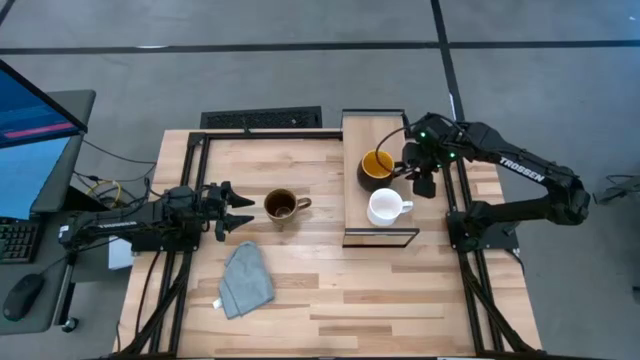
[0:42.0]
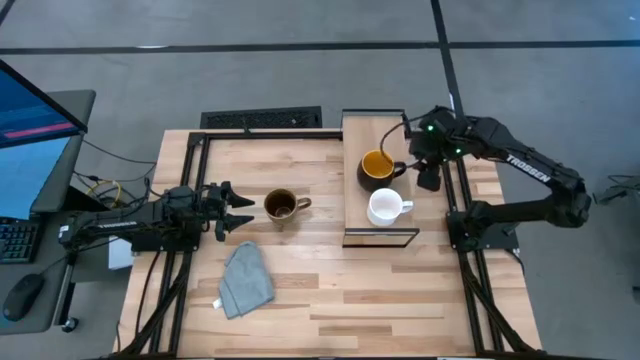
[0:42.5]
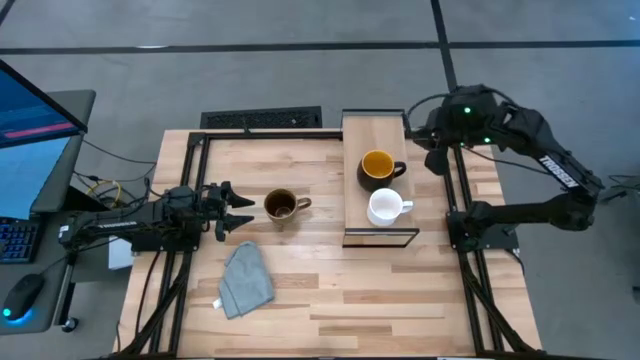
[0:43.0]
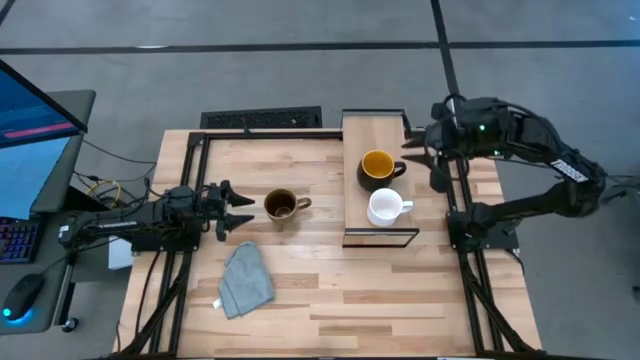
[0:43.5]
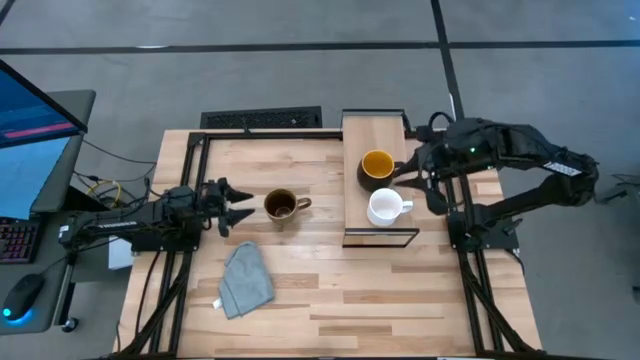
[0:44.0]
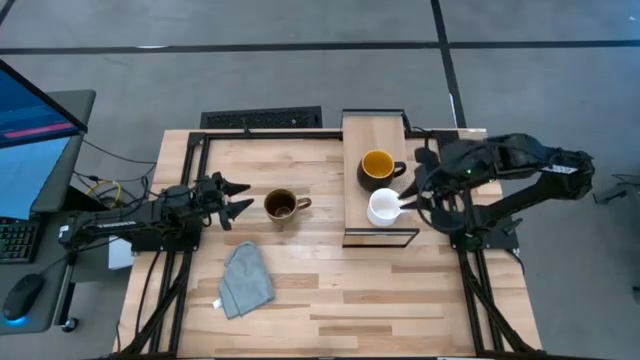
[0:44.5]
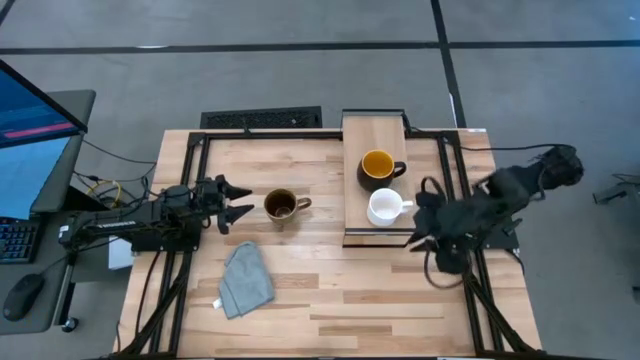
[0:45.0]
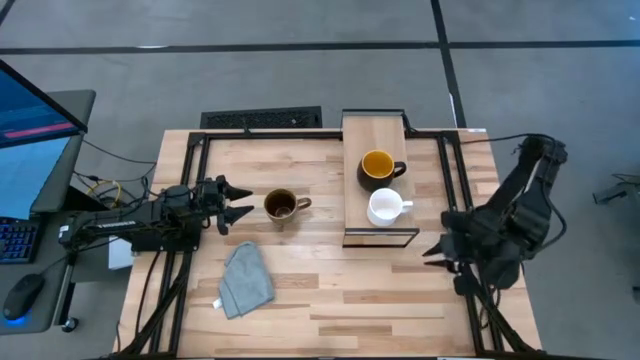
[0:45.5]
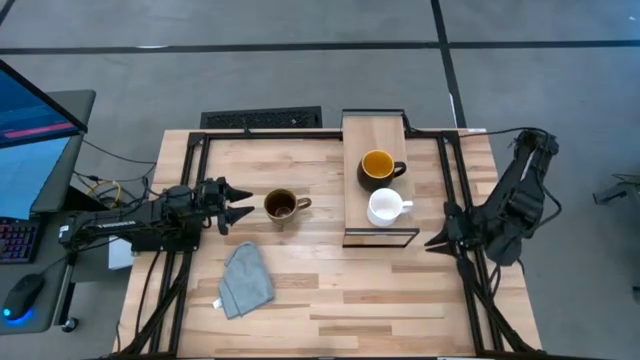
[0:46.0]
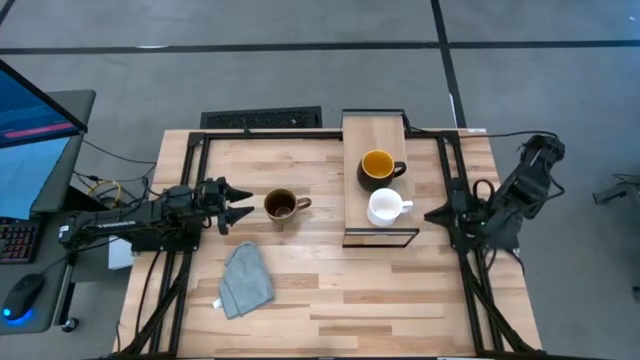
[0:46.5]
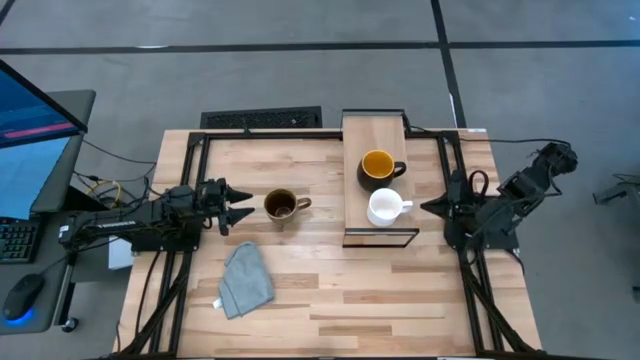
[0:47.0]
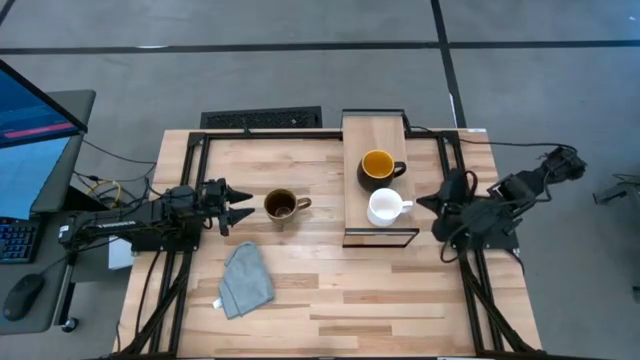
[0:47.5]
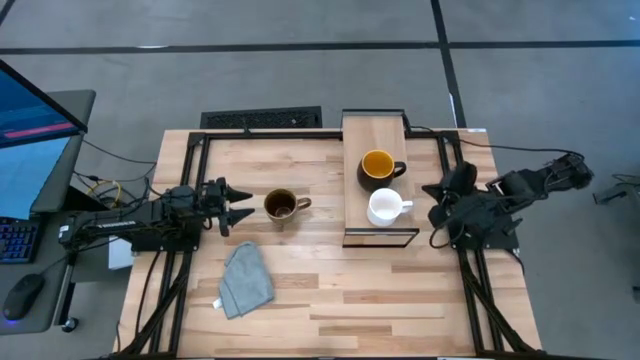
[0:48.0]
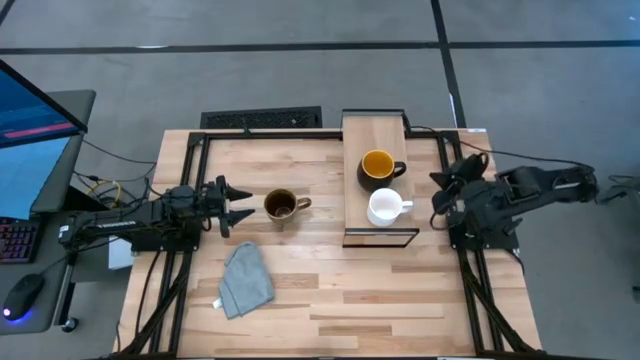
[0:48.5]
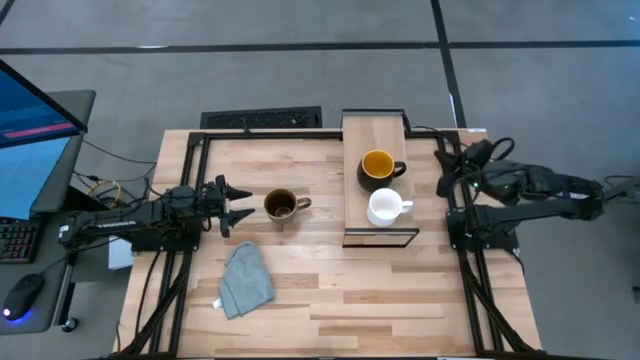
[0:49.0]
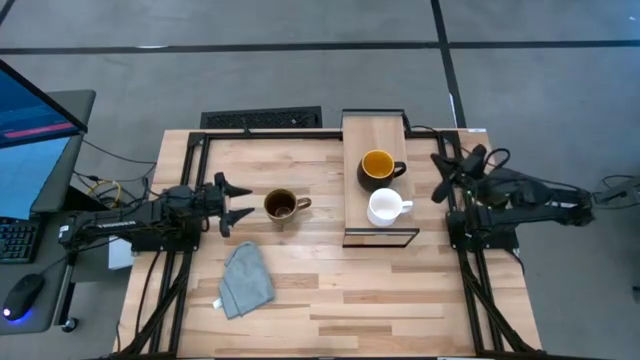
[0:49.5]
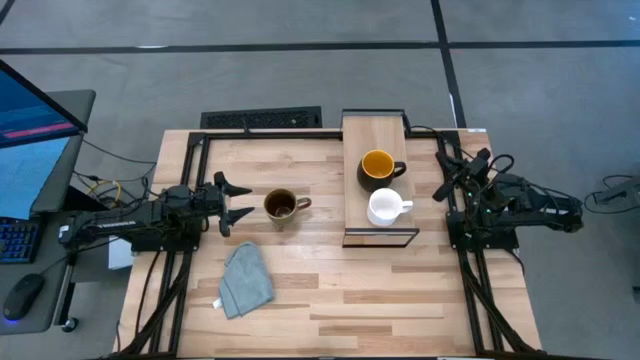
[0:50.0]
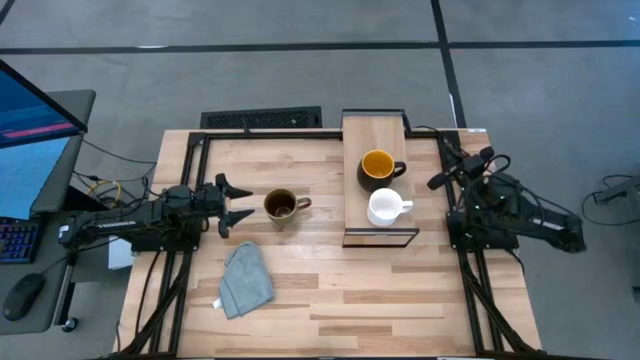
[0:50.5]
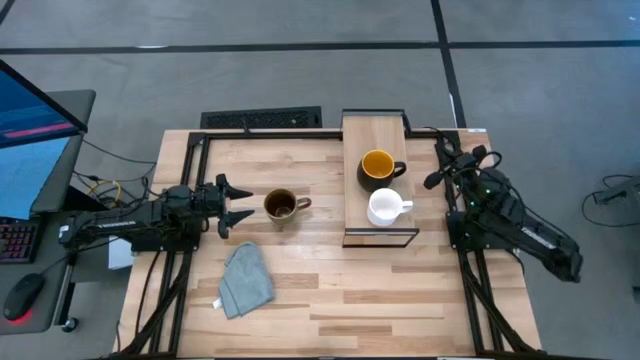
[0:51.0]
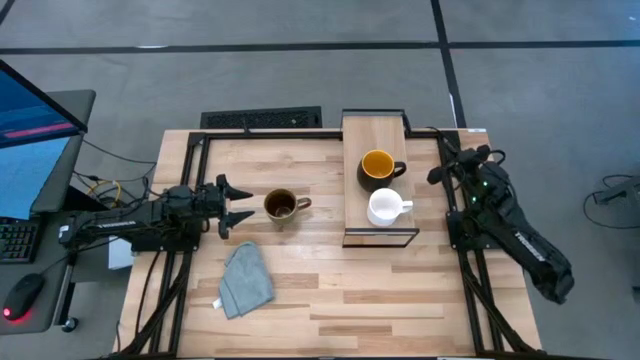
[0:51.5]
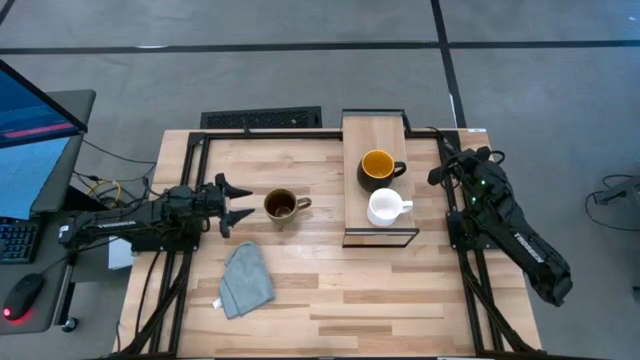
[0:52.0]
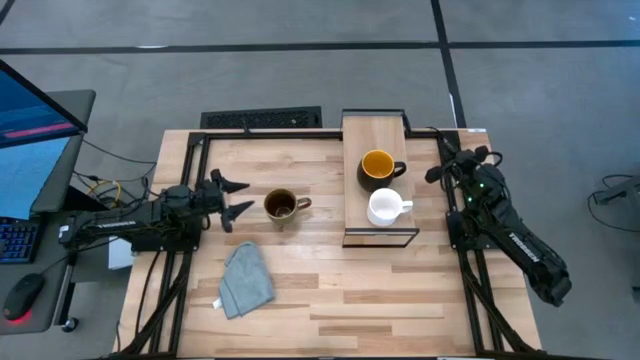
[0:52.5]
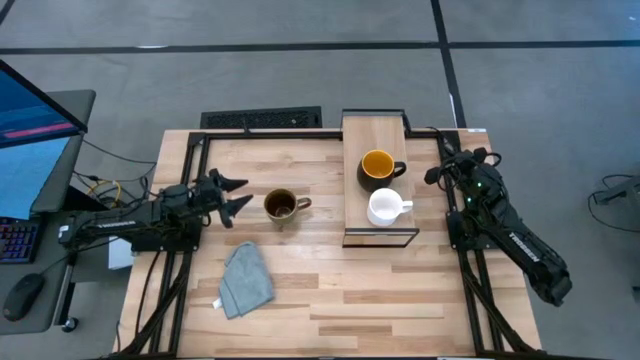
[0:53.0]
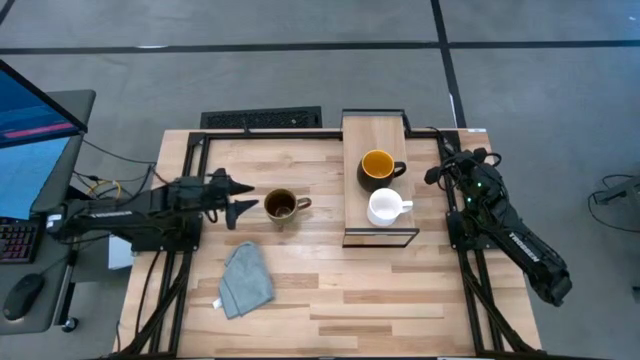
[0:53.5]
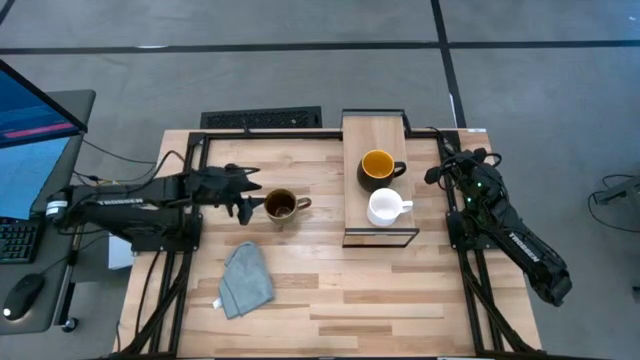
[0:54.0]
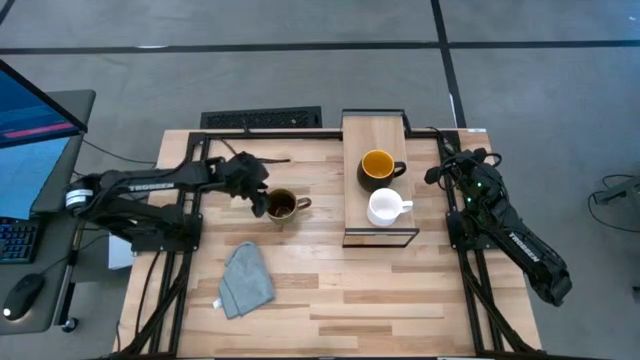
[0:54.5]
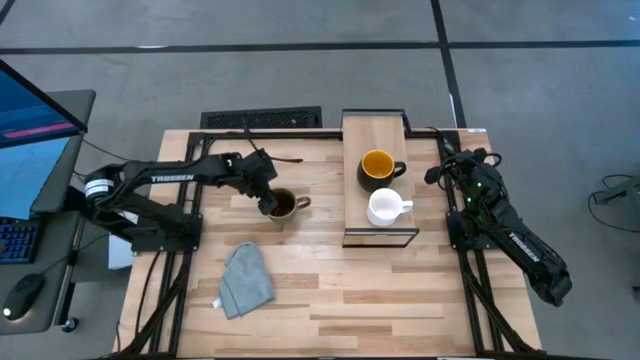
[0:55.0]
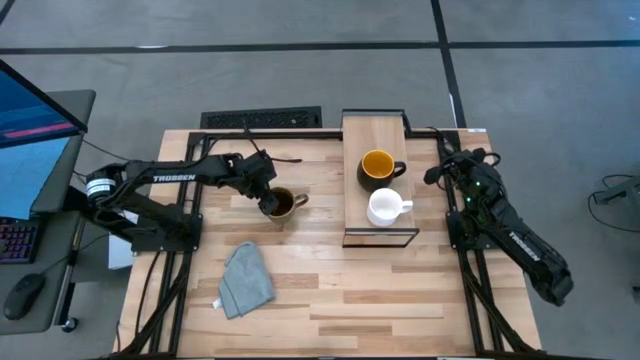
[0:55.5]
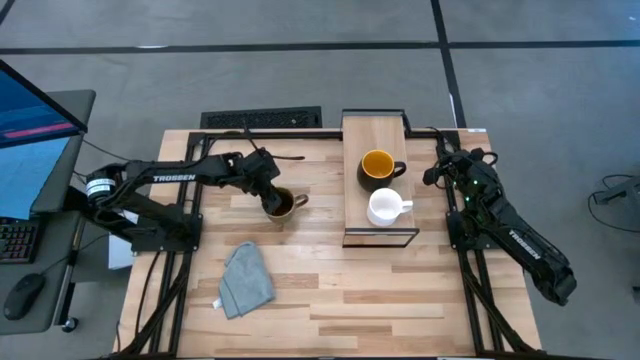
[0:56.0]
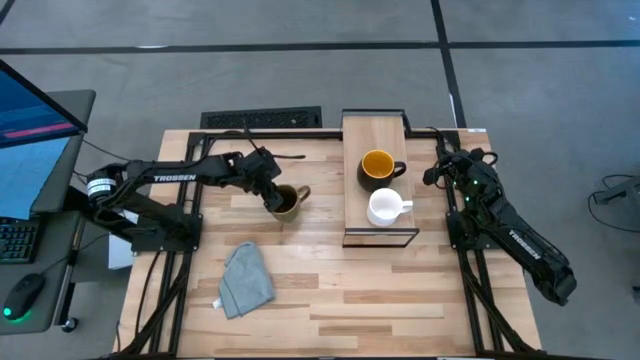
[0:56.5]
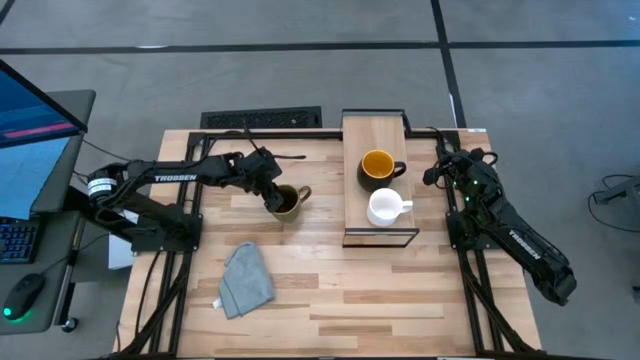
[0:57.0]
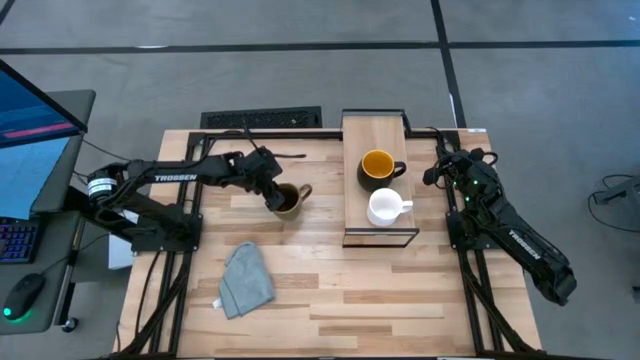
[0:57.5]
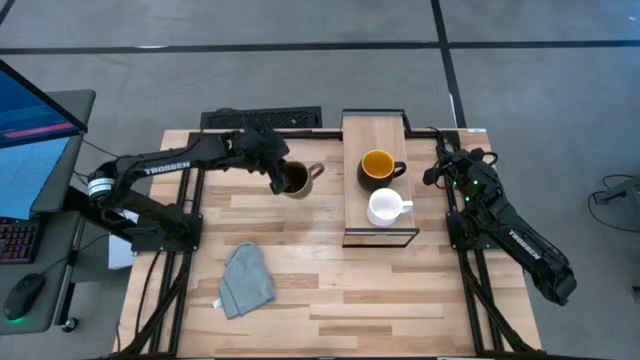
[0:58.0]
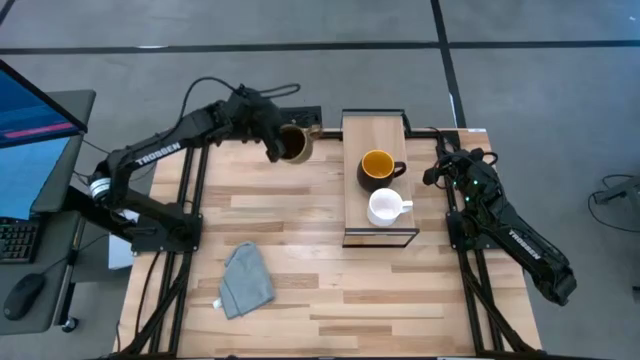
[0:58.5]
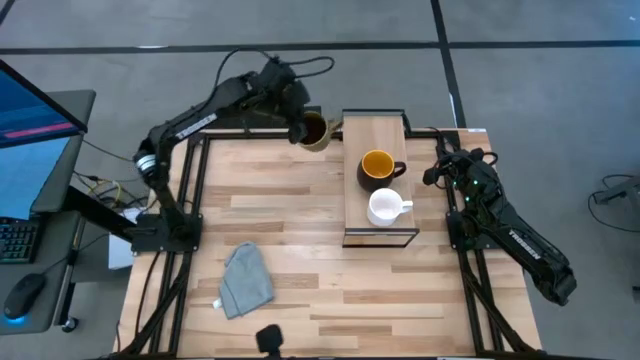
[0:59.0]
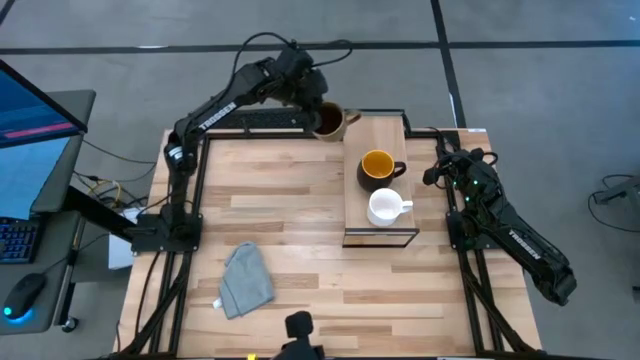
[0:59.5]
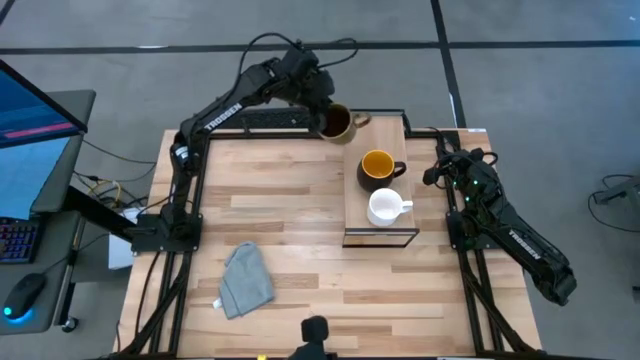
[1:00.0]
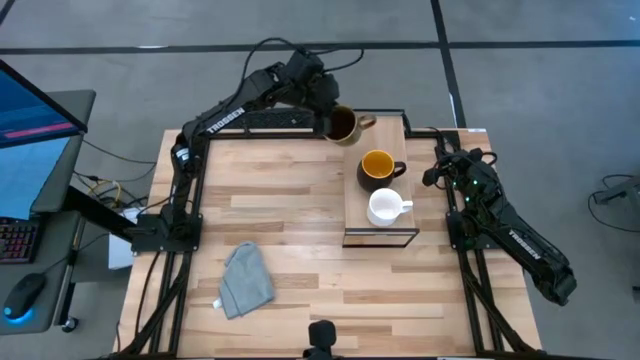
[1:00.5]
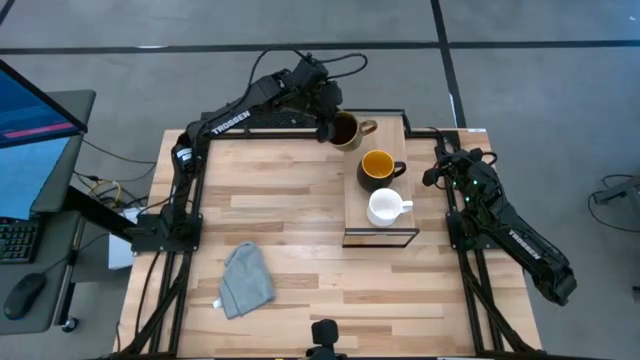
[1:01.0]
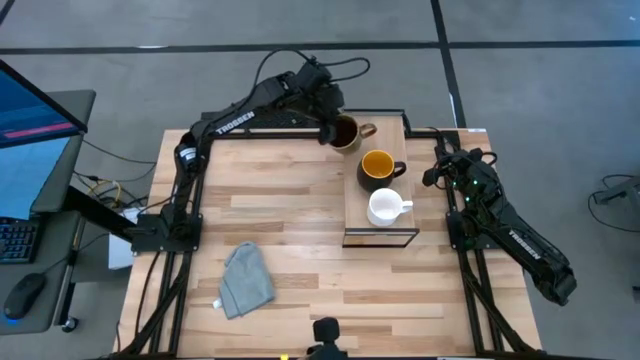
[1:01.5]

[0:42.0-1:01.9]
Task: Stack small to large cups/mugs on shelf
Put the brown mug on the shelf
